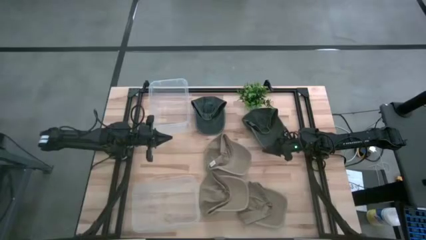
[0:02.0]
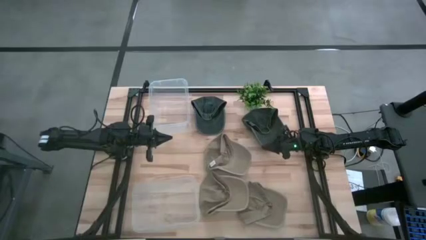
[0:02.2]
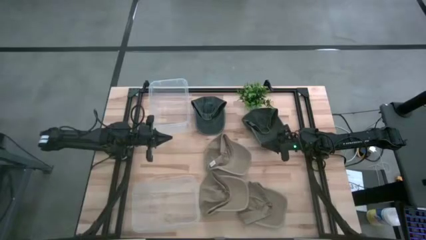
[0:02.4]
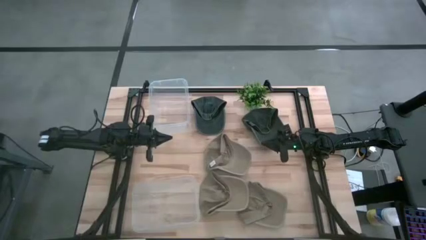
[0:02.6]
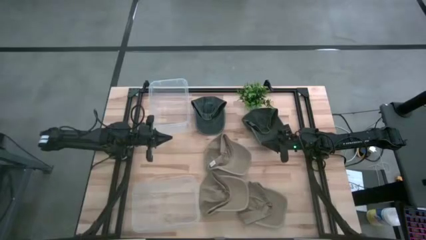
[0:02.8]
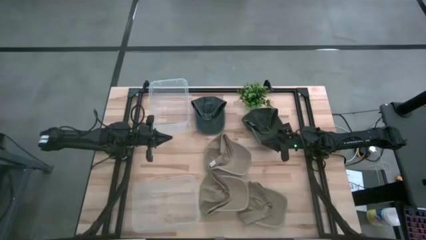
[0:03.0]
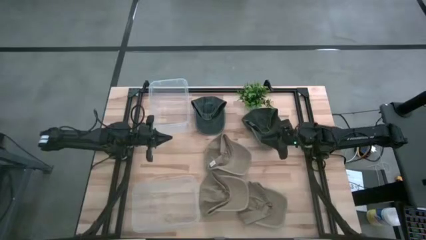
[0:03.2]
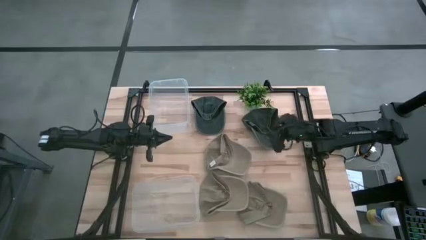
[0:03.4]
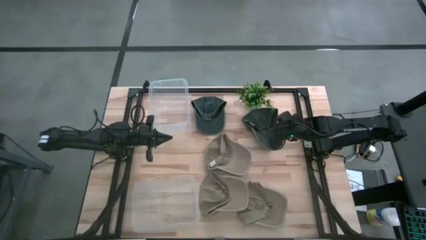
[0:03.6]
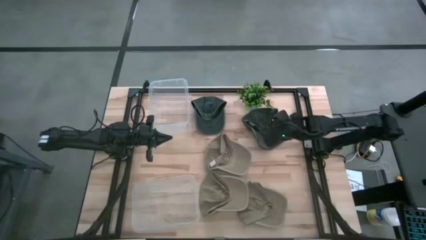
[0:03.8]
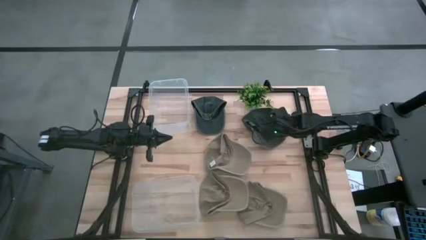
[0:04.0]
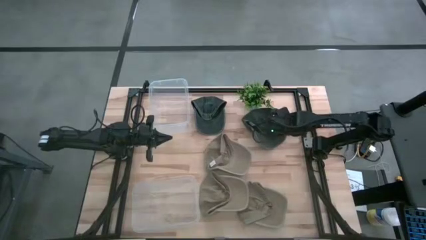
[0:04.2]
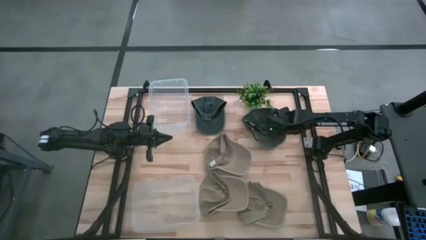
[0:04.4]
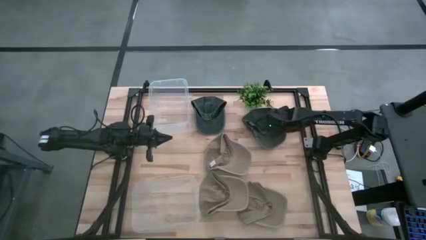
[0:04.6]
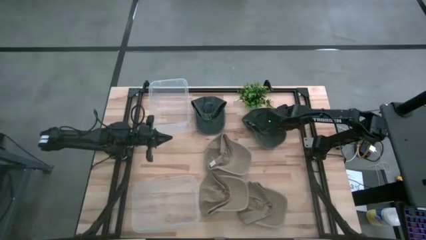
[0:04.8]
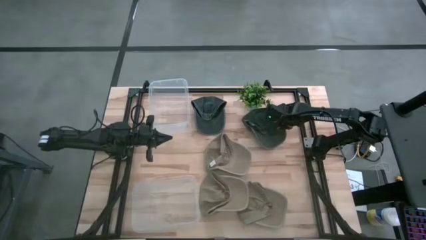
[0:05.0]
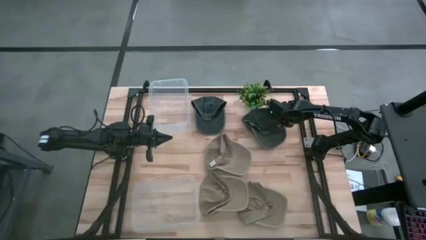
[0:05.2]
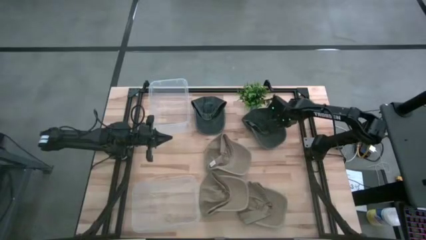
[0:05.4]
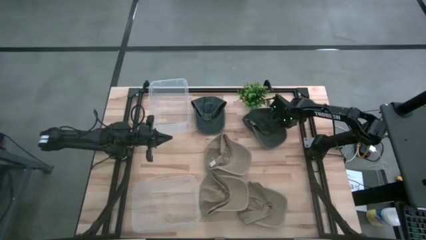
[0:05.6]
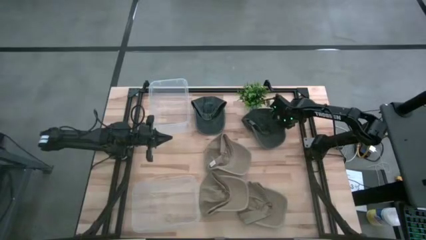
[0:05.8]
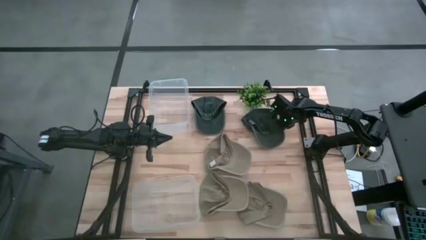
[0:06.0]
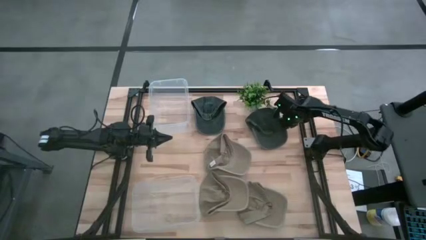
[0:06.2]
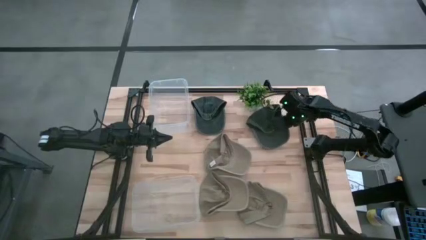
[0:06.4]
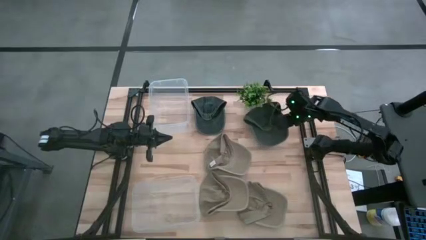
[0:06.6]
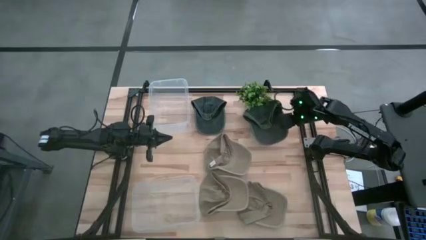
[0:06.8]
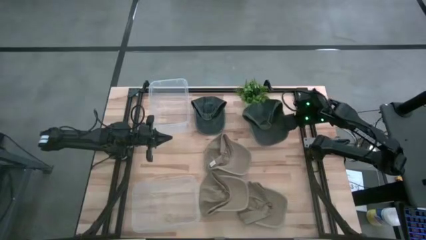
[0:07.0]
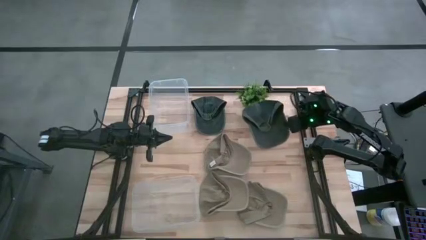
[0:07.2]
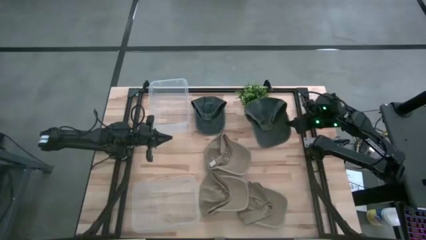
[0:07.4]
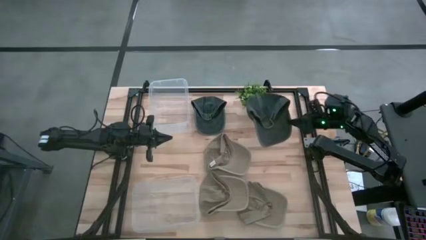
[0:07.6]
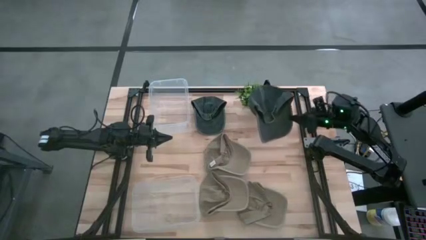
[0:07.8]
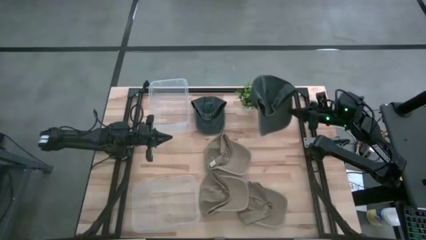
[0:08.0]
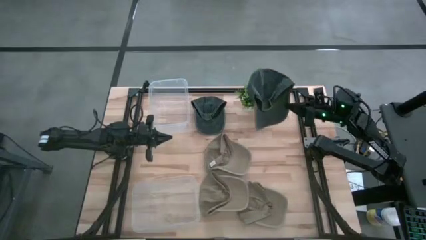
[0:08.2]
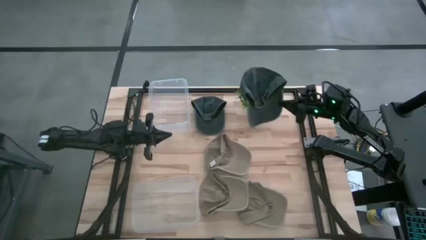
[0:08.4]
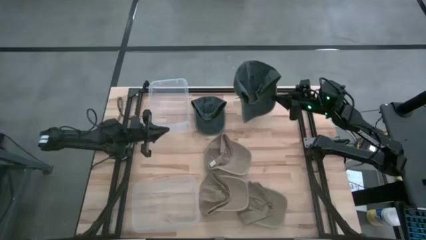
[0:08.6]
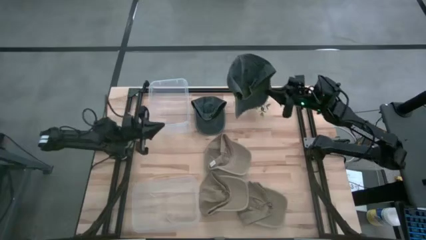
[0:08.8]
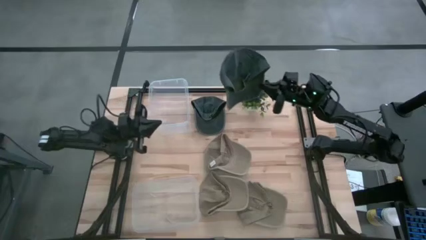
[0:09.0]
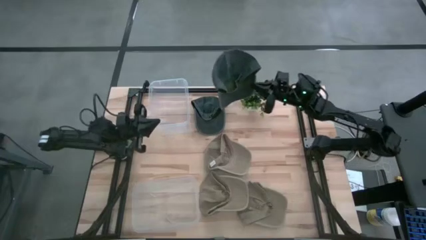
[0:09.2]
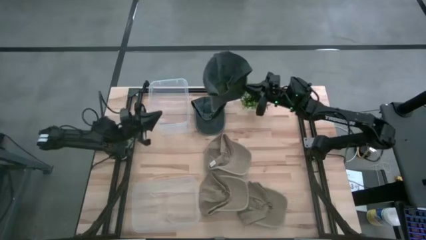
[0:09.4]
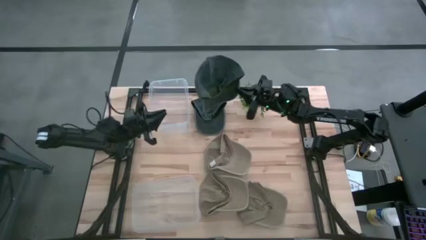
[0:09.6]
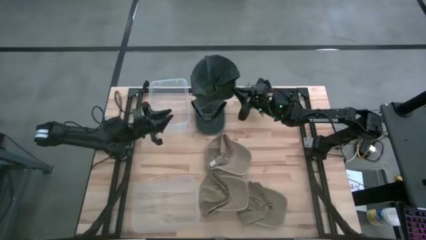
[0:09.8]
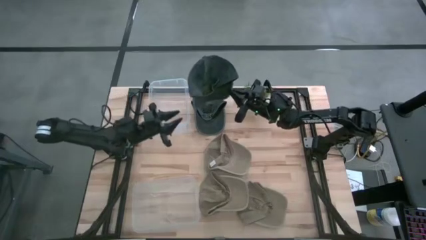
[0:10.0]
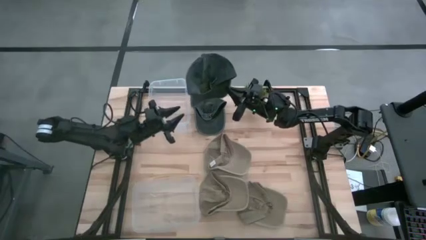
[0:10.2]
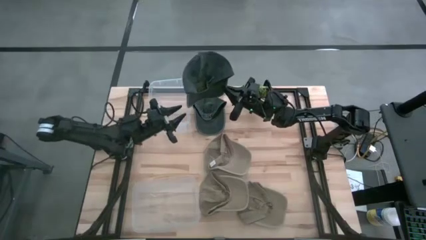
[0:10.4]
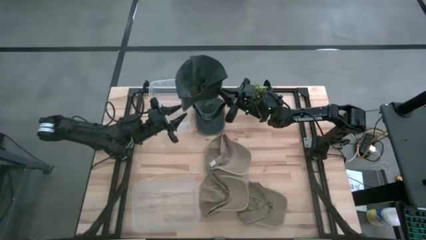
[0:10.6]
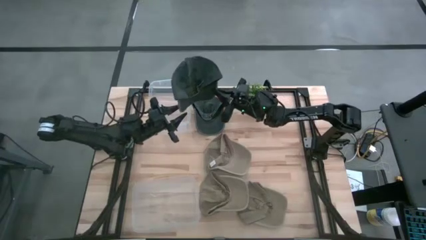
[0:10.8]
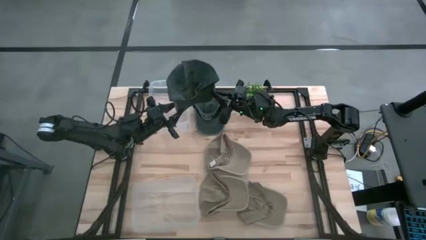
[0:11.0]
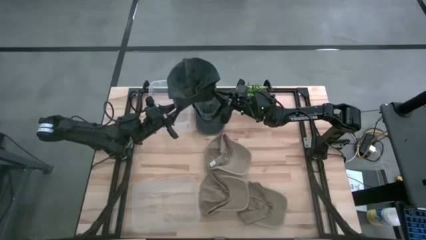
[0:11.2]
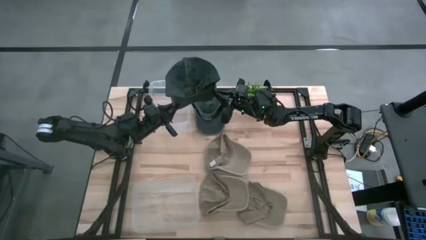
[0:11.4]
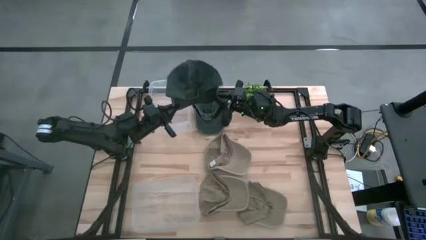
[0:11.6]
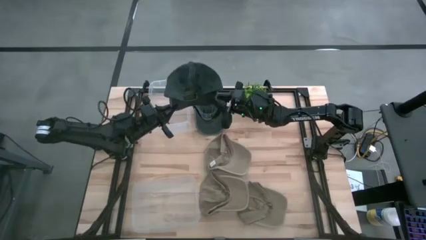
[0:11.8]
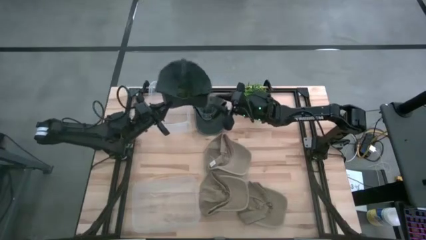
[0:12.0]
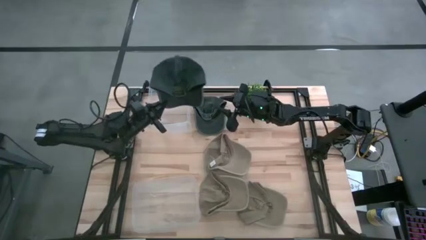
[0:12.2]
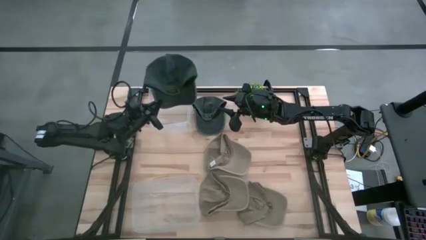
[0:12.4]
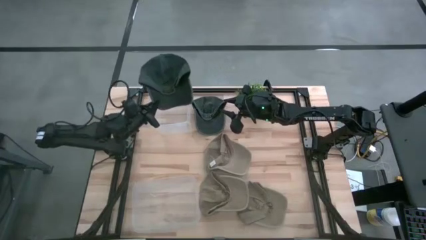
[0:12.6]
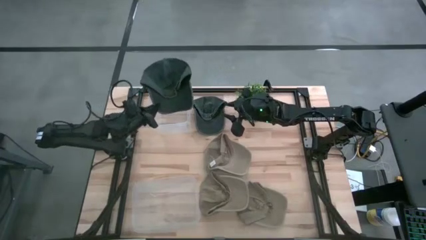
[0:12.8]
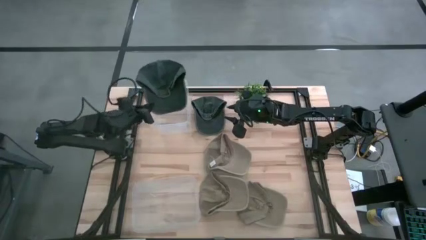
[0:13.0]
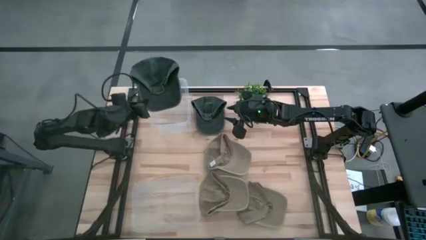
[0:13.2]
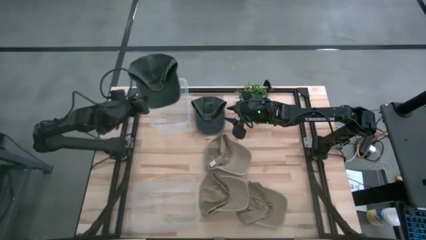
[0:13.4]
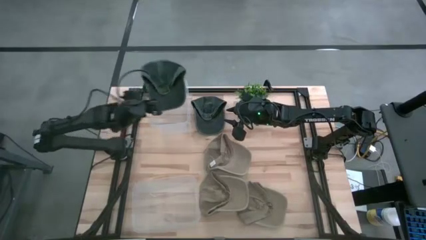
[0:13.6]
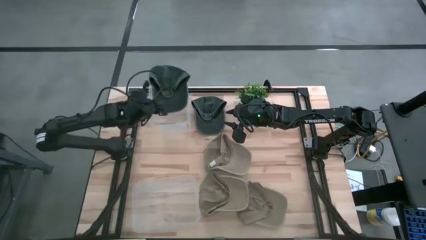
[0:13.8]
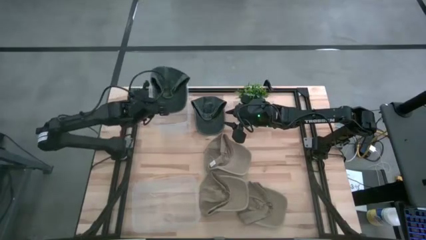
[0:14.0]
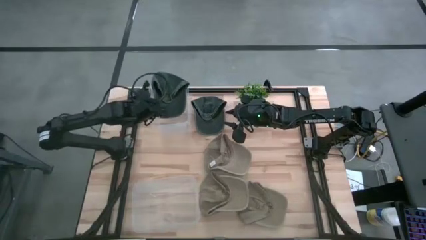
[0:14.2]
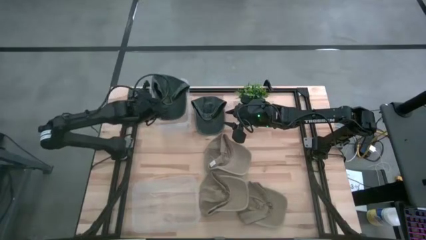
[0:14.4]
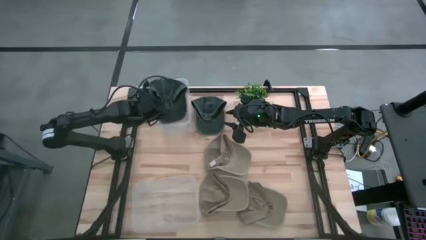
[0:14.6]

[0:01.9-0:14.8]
Task: Pick & Place hat
Put the black cap into the top transparent bin
